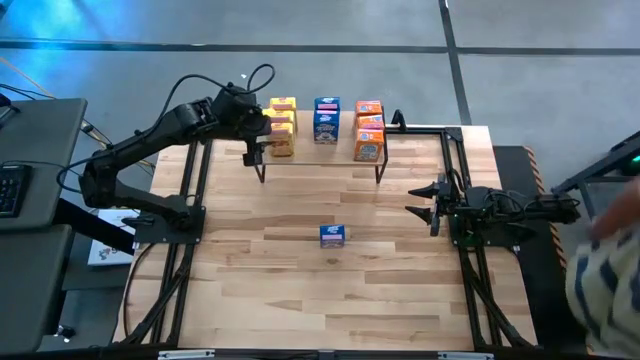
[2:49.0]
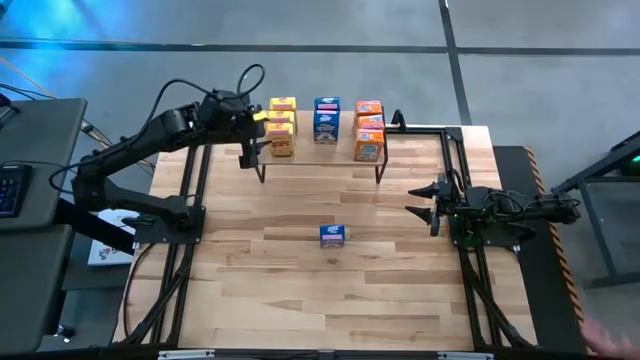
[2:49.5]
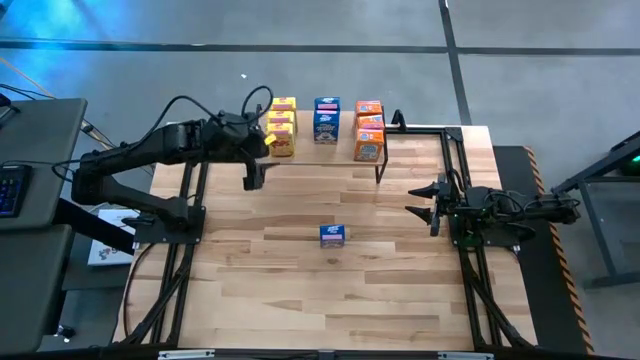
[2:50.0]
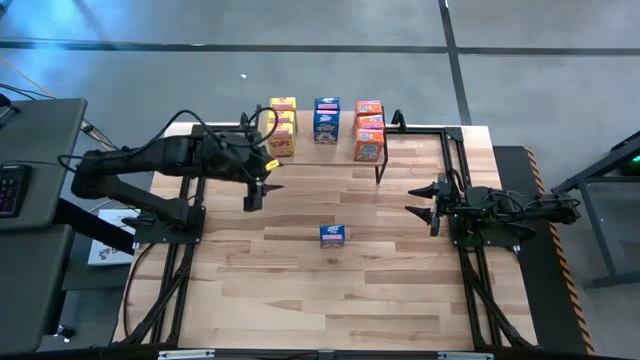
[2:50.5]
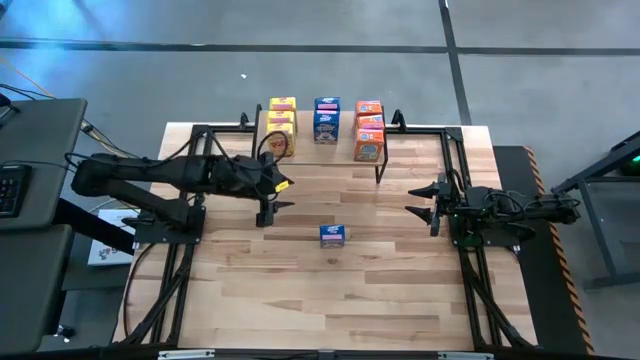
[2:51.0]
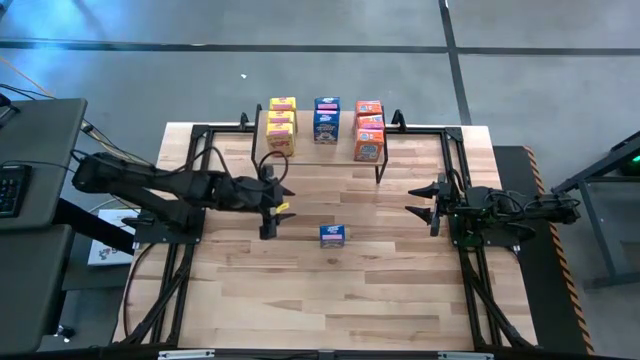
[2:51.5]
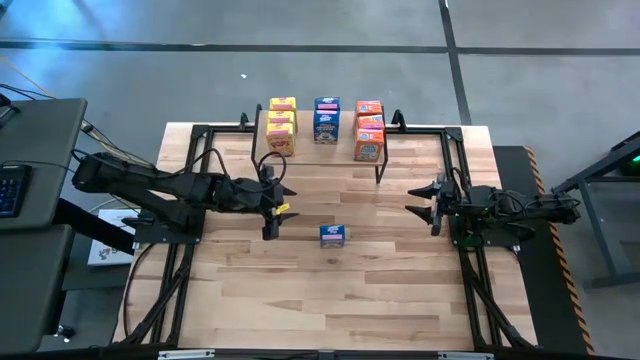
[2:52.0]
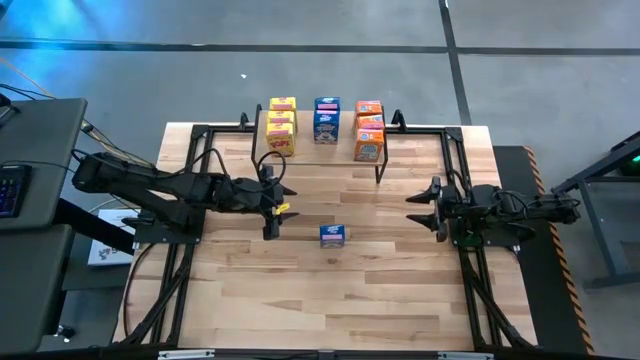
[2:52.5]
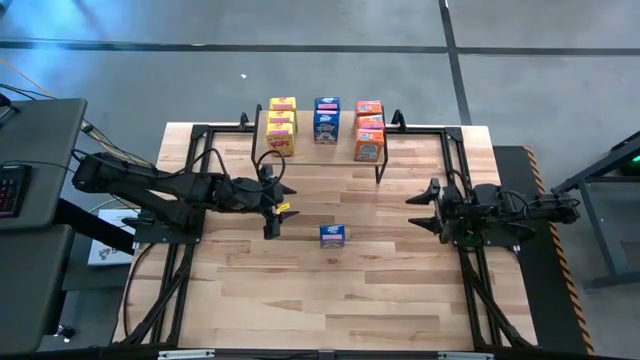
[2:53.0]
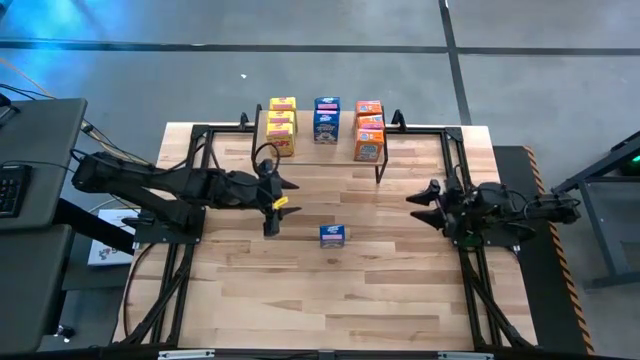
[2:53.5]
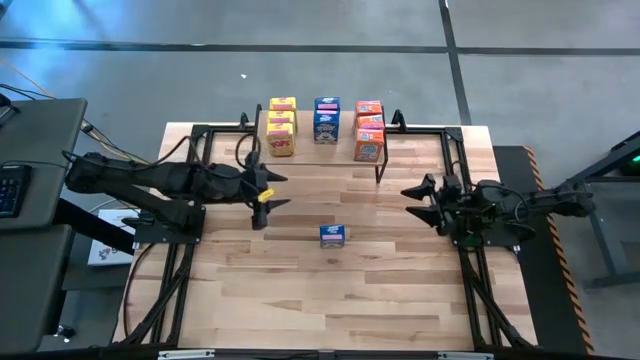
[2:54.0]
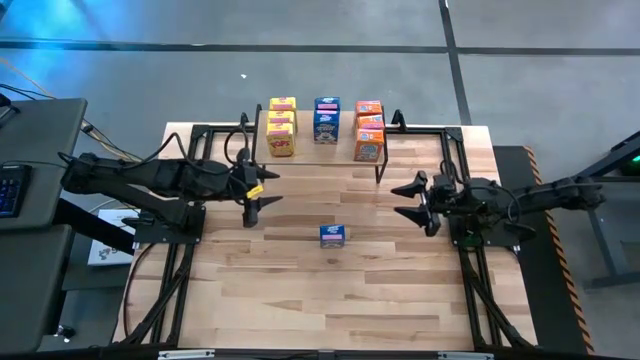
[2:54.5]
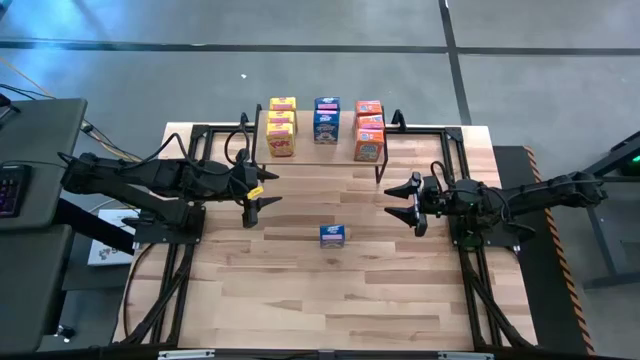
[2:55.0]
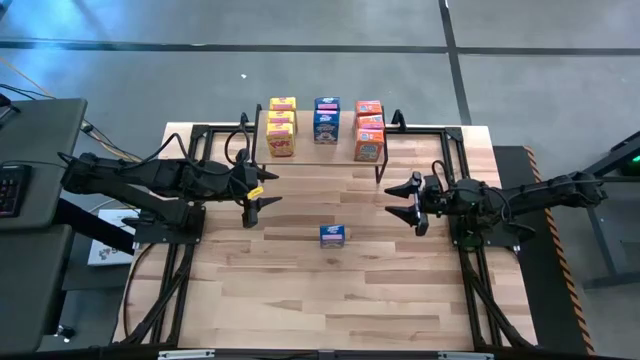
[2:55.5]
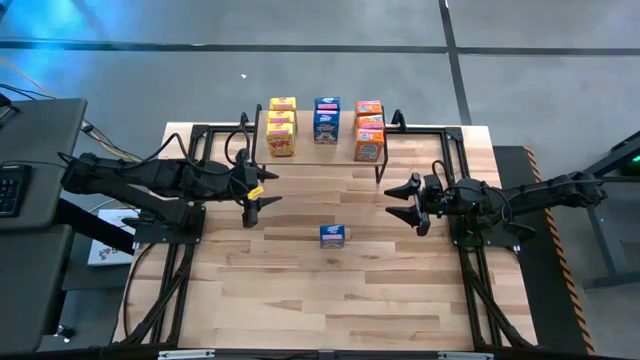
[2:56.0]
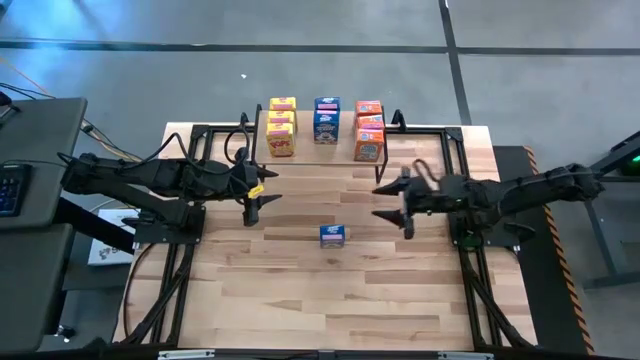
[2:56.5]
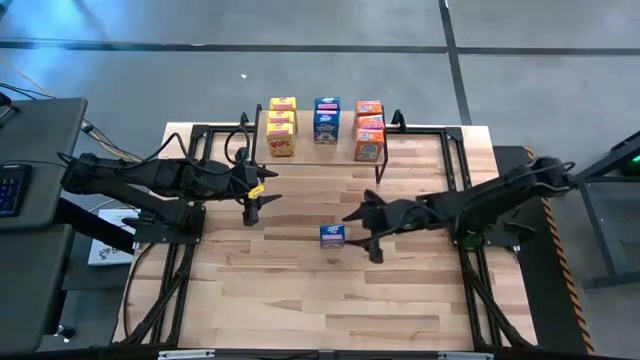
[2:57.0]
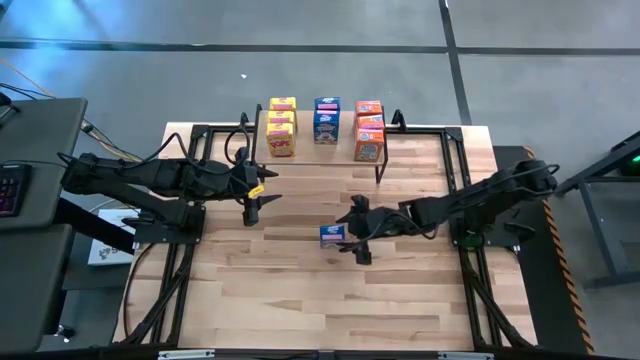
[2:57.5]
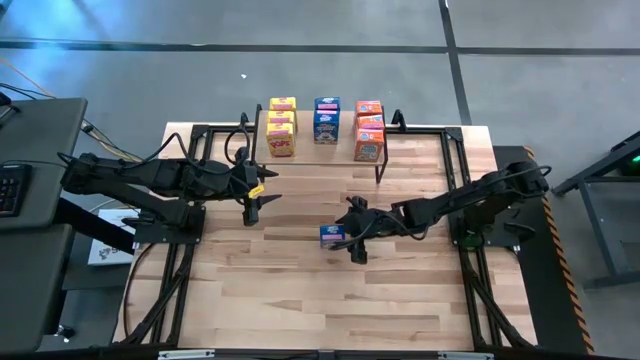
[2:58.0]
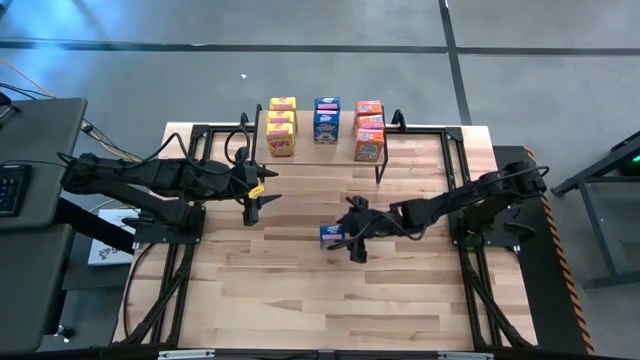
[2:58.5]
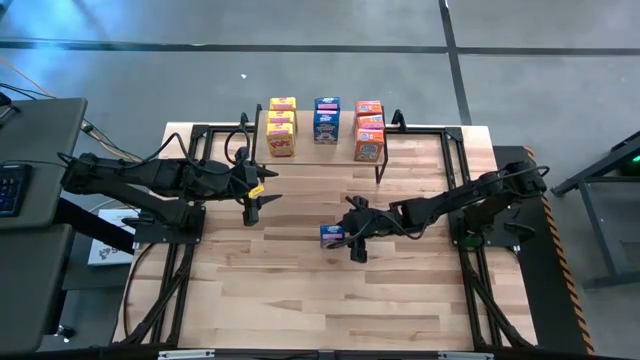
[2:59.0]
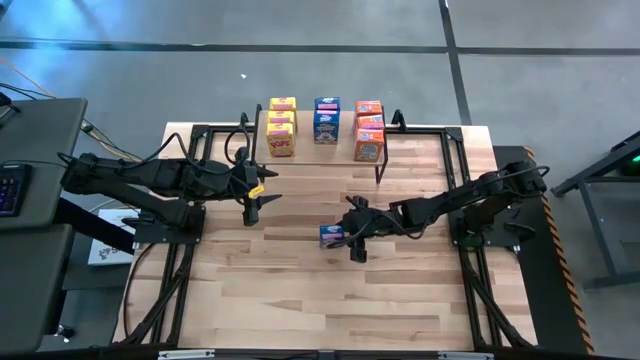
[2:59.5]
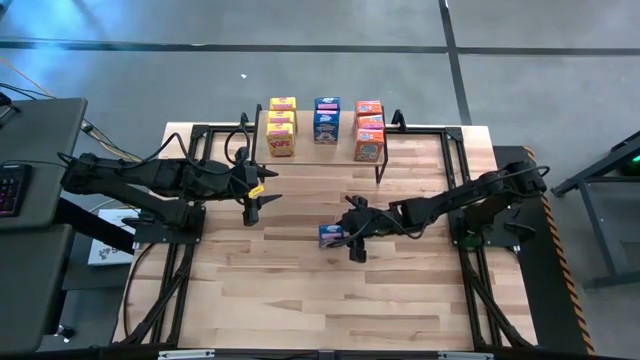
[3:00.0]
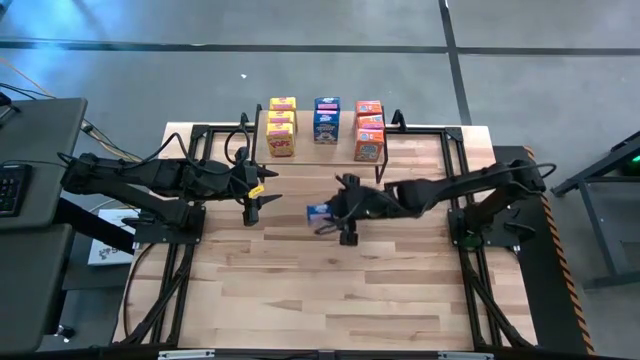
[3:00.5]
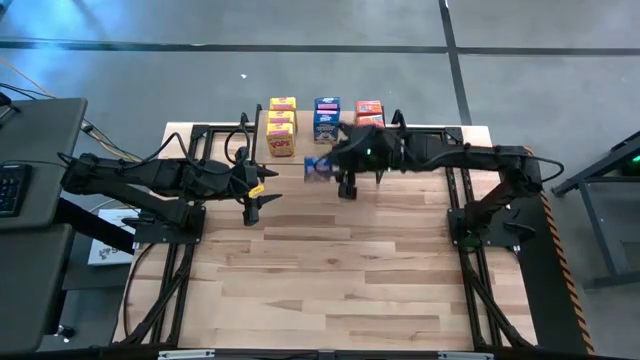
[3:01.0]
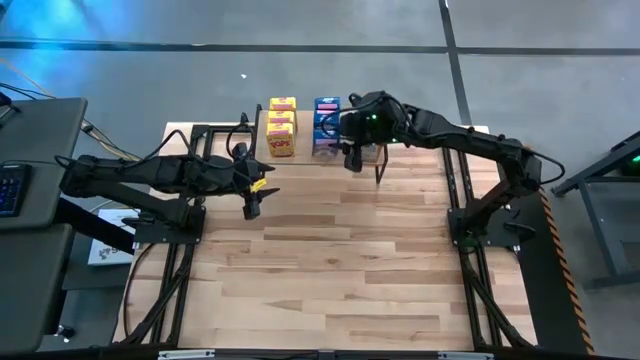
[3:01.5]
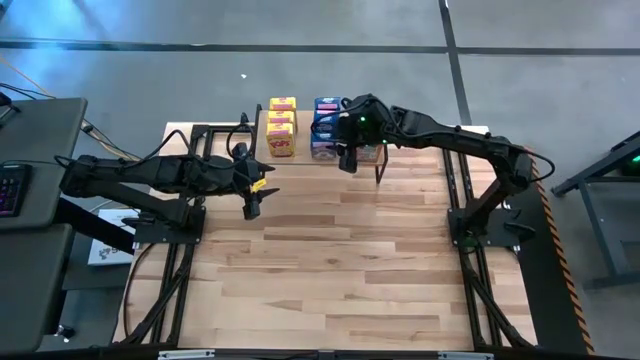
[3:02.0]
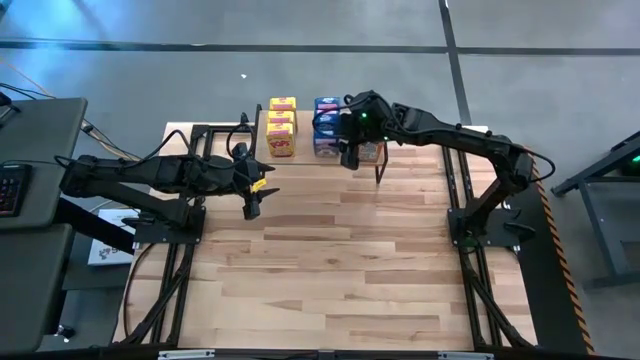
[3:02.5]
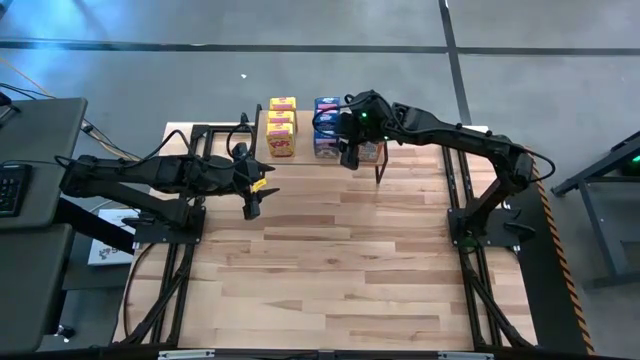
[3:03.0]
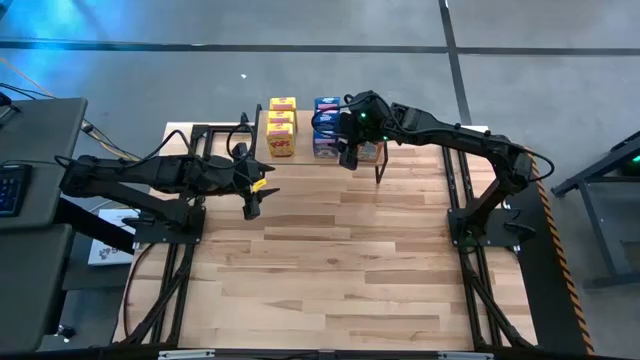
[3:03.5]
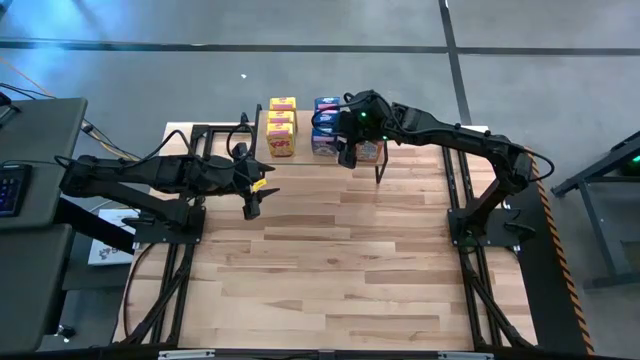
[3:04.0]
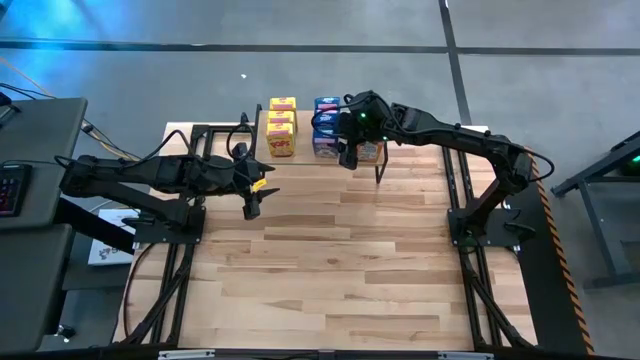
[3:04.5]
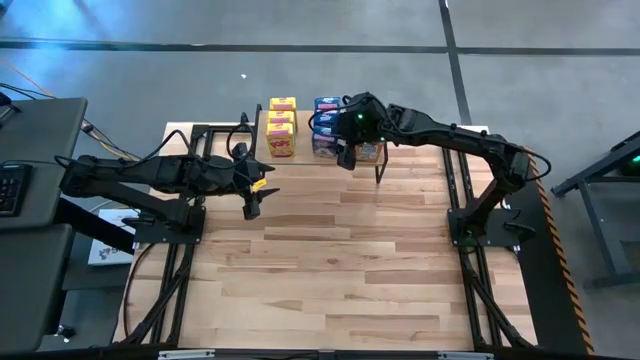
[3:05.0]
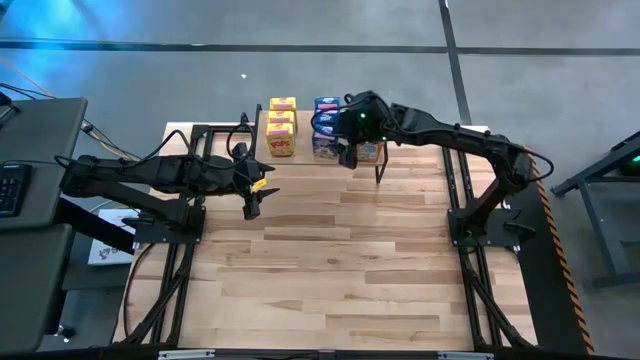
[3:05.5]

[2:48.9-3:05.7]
Task: Stack cereal on shelf
Put the blue cereal box on the shelf aligned with the other blue cereal boxes

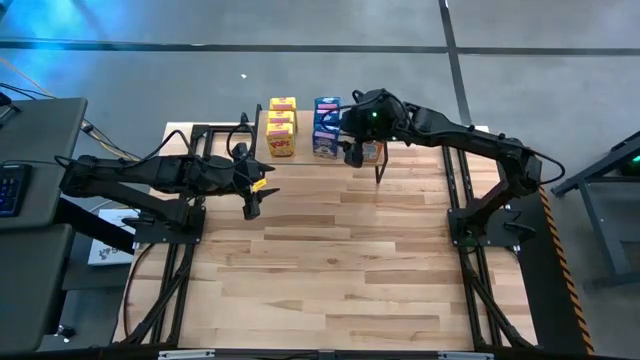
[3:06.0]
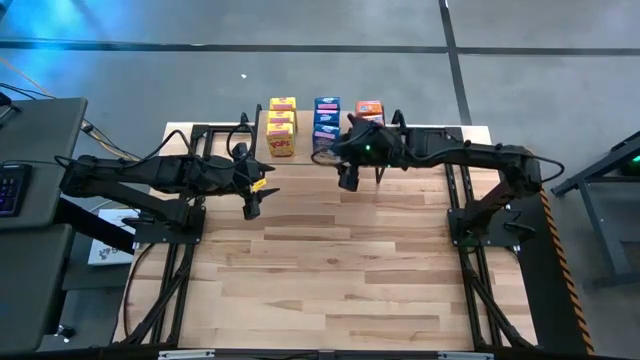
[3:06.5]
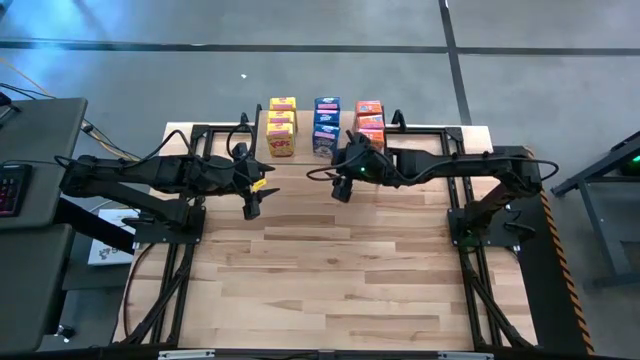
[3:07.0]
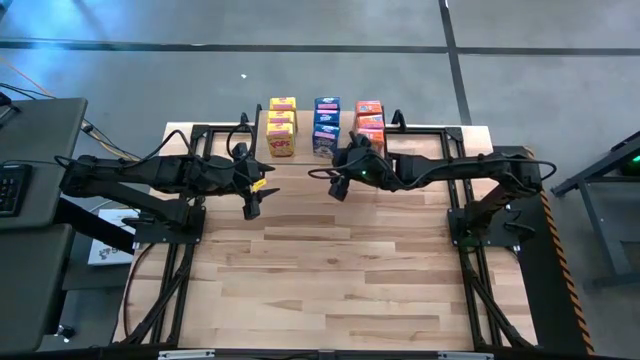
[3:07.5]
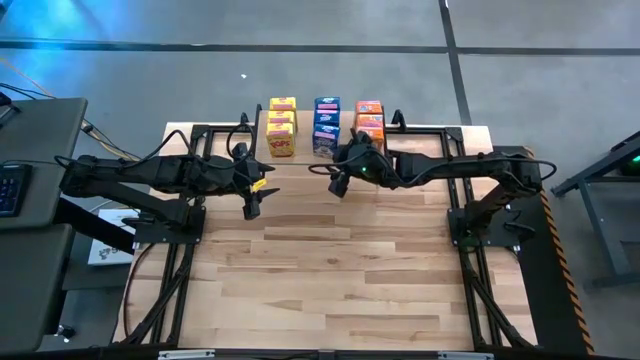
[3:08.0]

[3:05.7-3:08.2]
Adjust the orange cereal box on the shelf

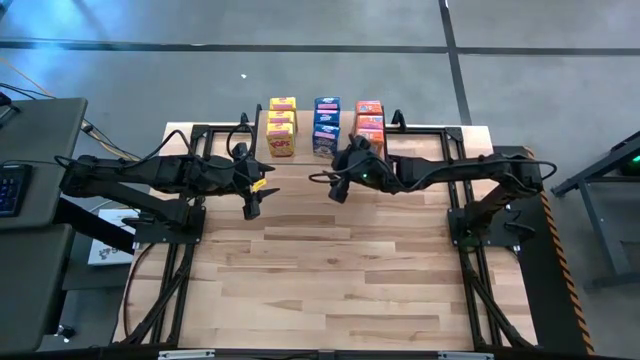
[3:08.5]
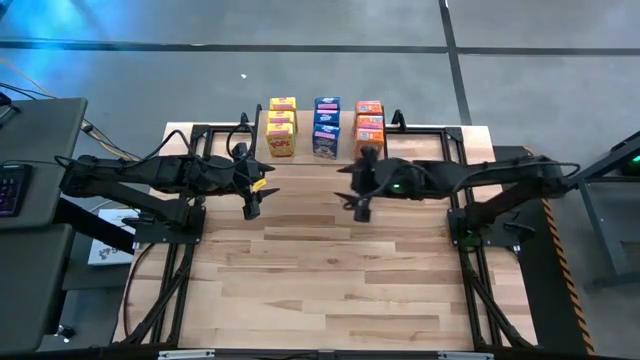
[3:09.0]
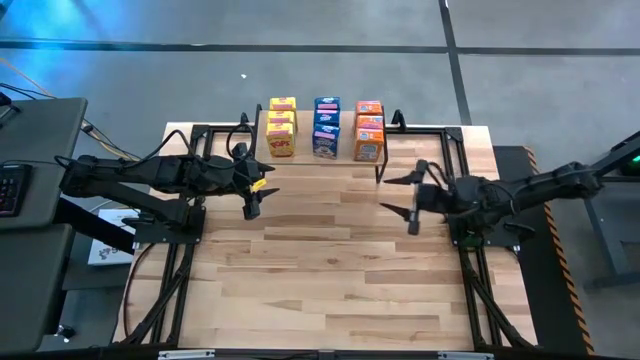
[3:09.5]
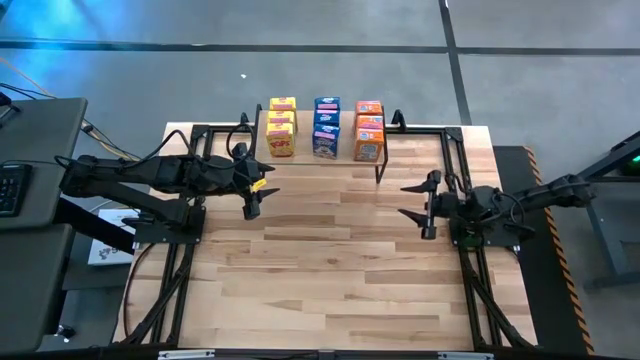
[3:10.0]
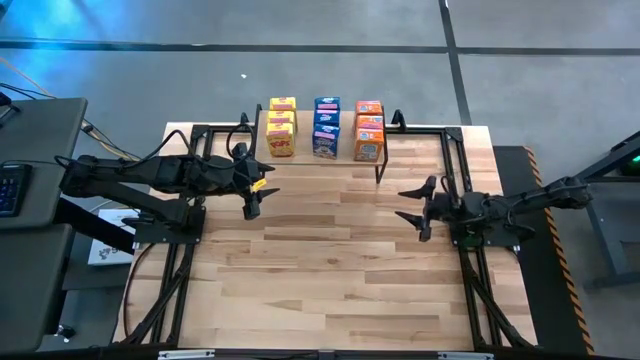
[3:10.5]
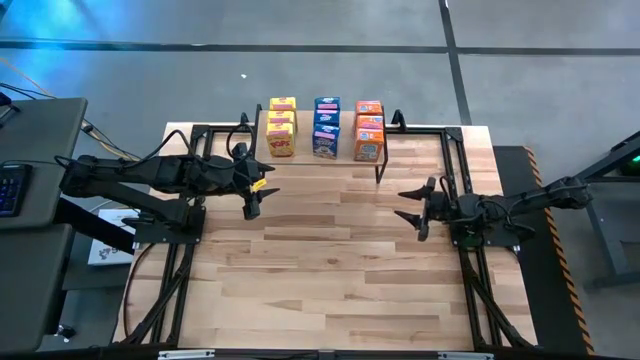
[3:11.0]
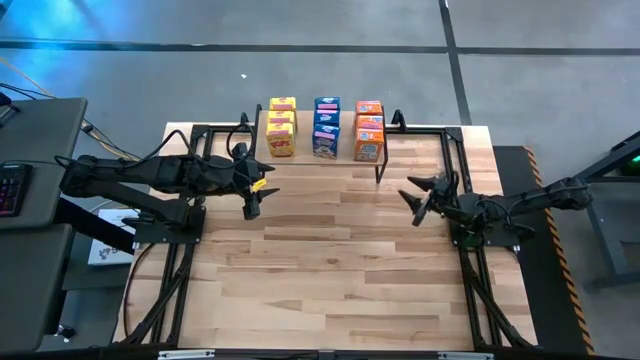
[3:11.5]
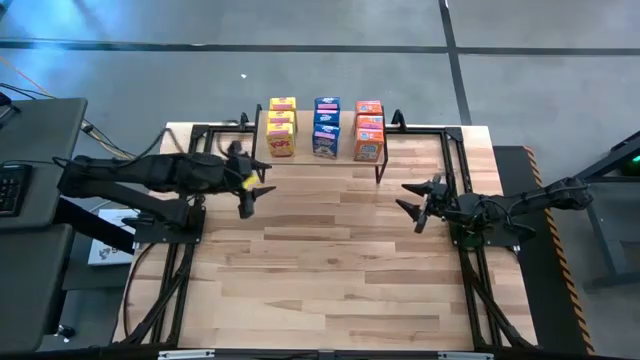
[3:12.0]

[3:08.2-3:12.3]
Return to Home Position
